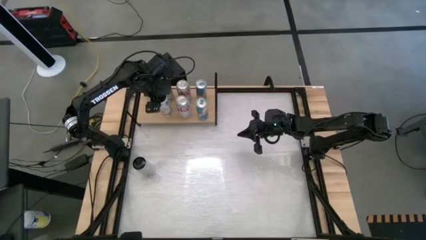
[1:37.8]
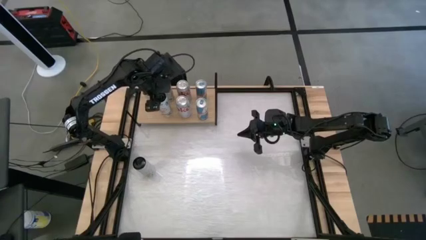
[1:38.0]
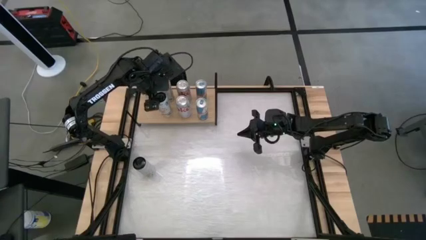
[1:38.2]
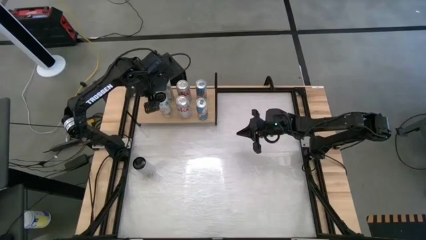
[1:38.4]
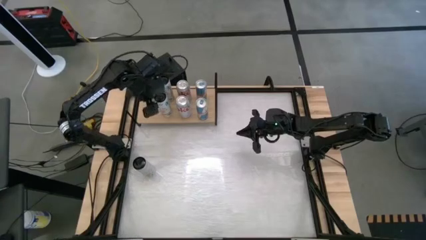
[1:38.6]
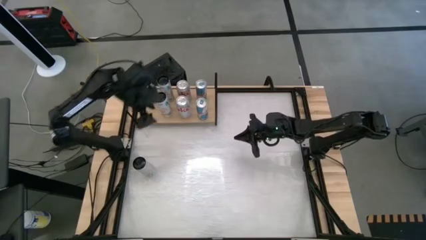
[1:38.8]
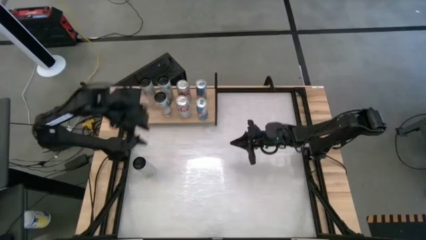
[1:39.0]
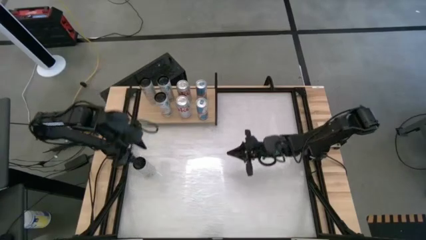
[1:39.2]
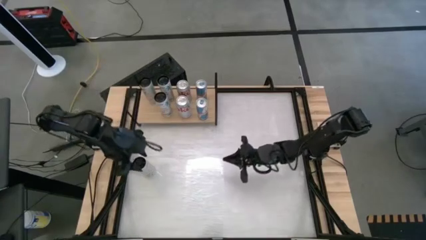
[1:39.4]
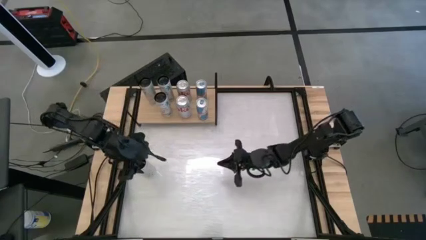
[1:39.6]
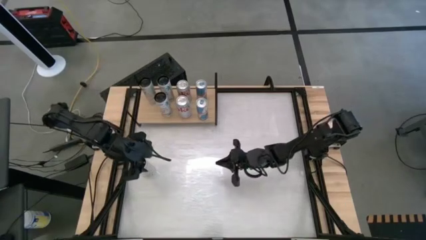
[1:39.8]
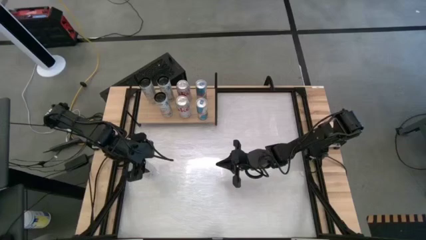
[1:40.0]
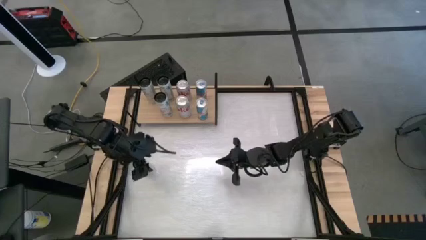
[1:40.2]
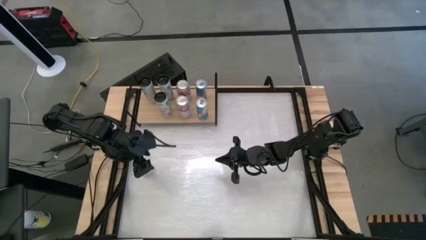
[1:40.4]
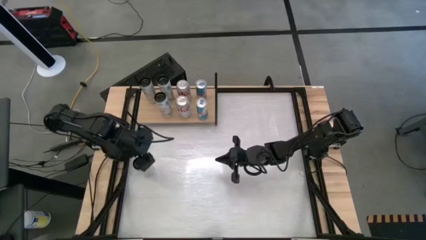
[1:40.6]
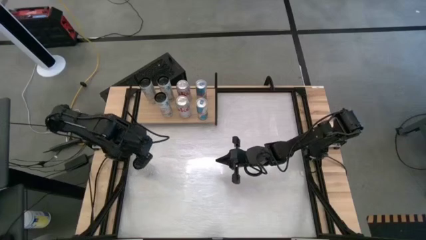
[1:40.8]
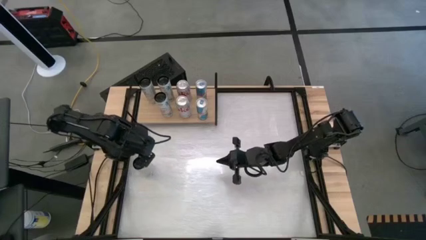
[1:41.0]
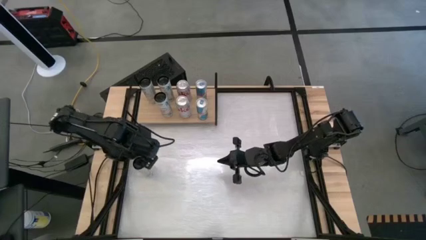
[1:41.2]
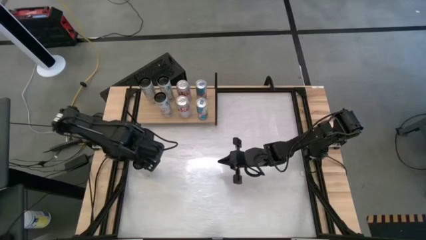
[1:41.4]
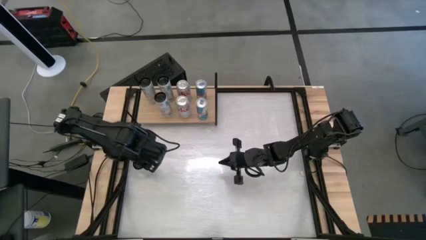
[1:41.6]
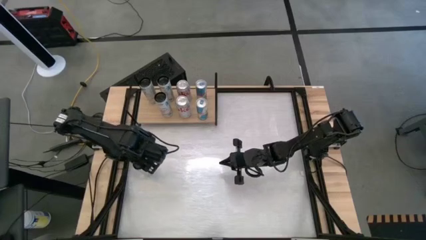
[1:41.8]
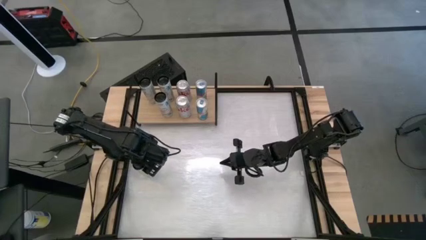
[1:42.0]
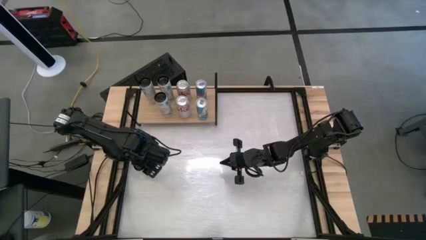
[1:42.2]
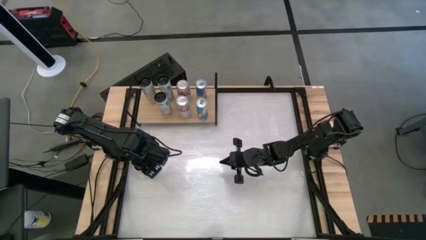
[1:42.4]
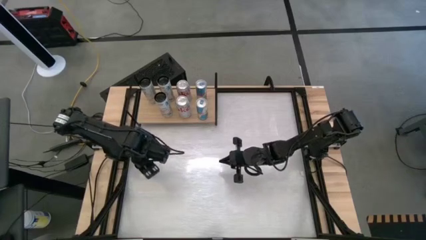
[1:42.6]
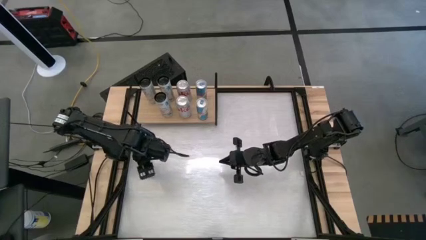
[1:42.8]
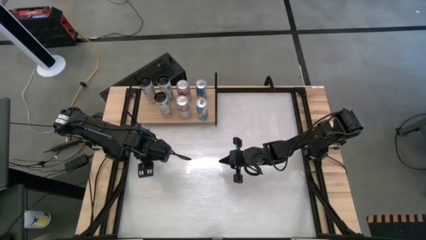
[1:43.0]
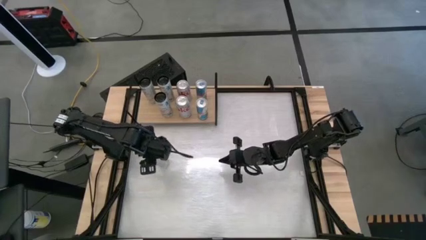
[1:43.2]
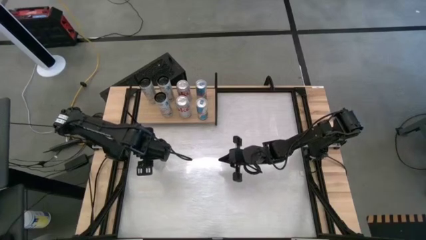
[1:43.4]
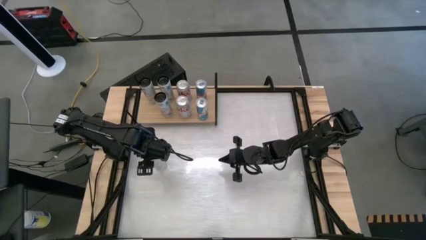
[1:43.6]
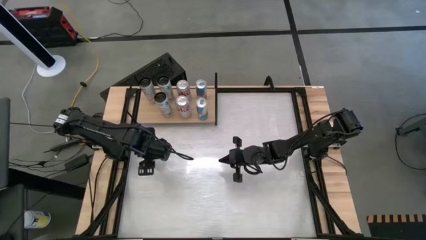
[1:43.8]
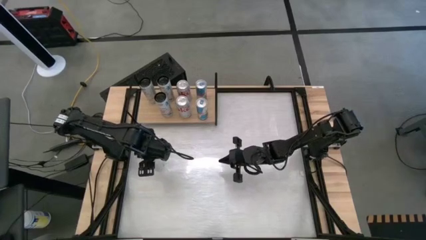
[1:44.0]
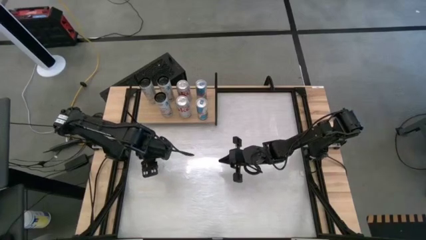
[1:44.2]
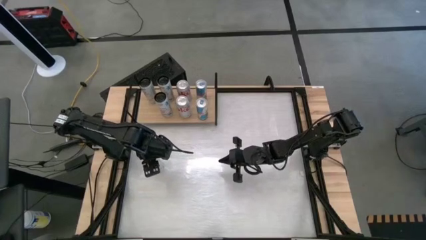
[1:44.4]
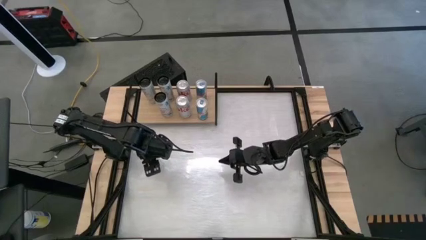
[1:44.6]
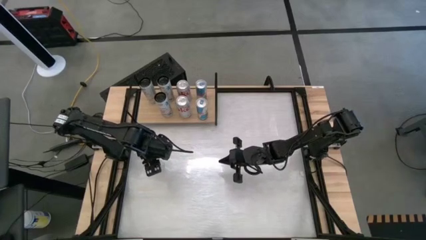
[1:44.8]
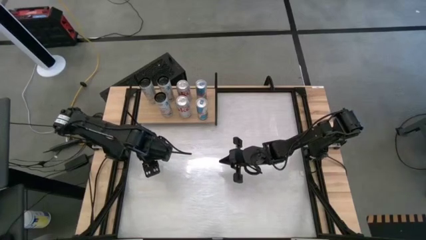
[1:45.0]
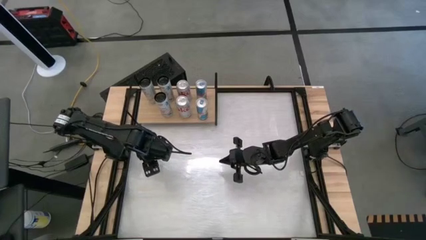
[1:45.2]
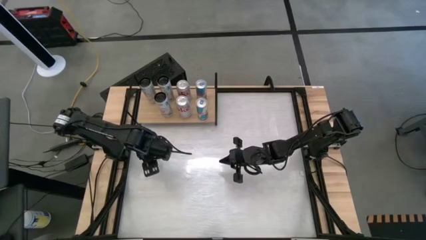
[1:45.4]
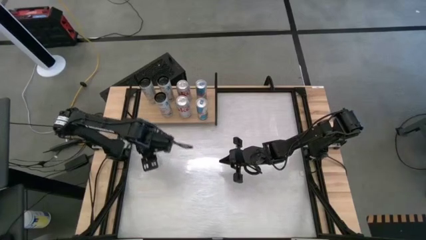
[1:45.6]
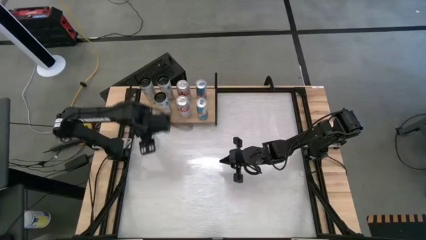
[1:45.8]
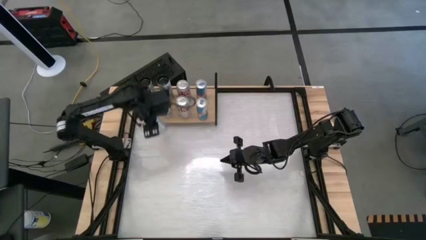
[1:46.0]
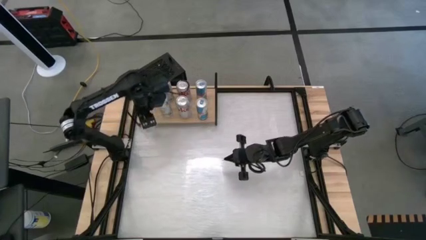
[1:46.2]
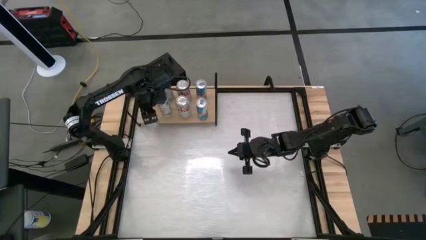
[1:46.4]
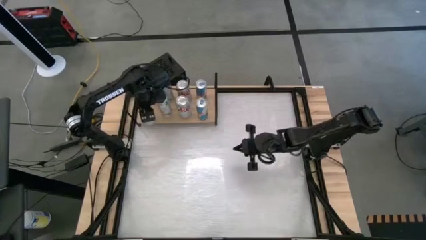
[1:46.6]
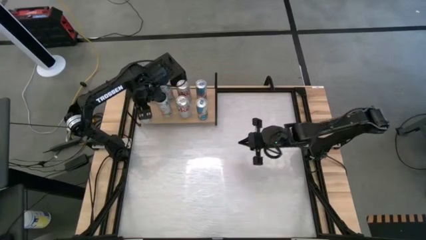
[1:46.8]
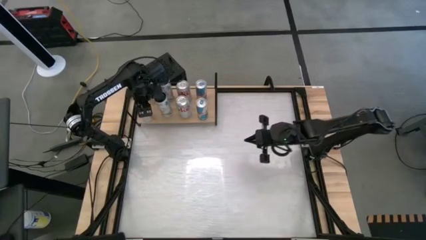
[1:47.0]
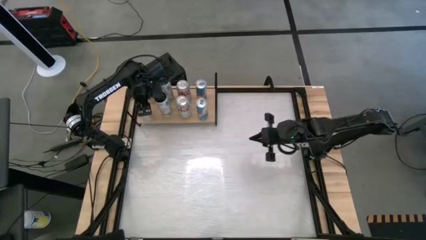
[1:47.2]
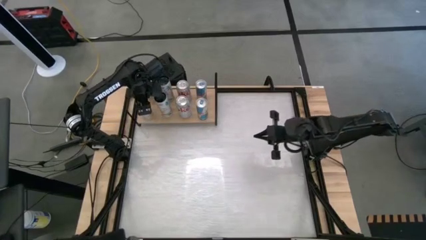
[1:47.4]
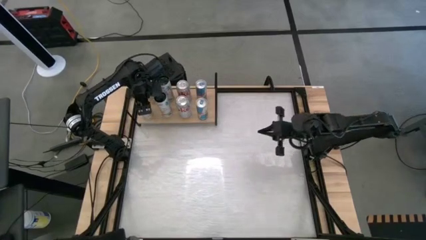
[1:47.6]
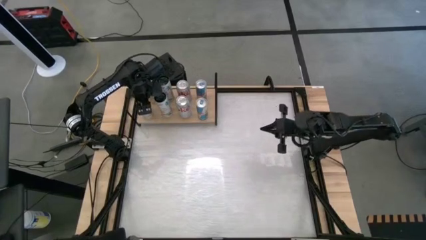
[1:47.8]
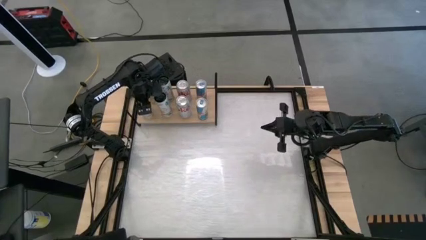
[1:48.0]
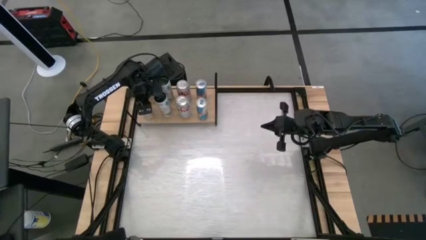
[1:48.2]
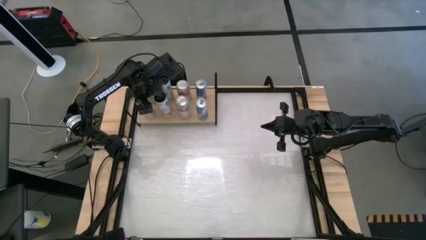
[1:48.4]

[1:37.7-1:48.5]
Task: Place canned beverage on shelf
Put the white soda can on the shelf

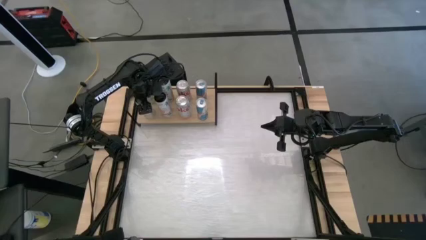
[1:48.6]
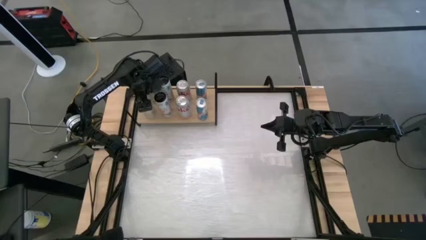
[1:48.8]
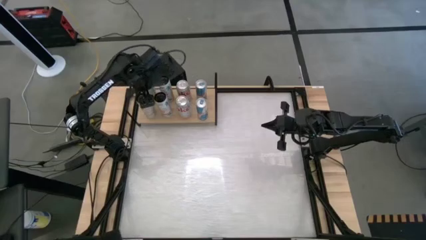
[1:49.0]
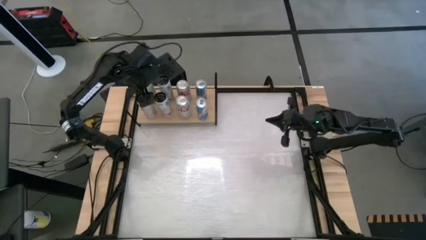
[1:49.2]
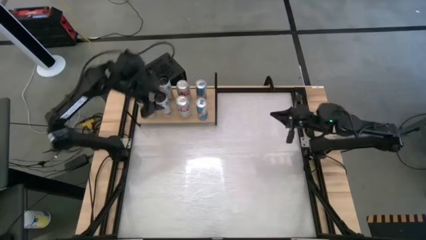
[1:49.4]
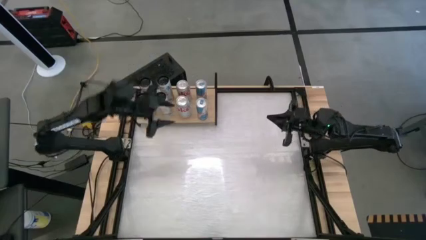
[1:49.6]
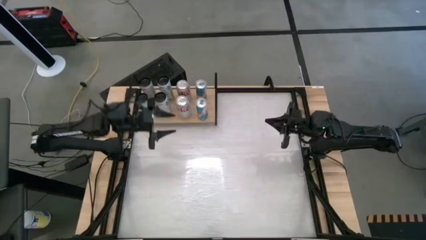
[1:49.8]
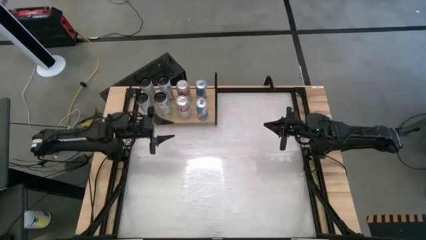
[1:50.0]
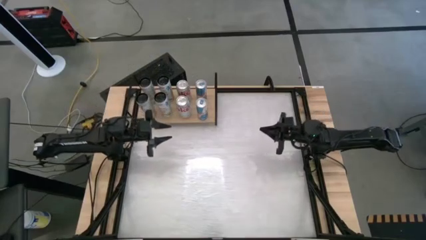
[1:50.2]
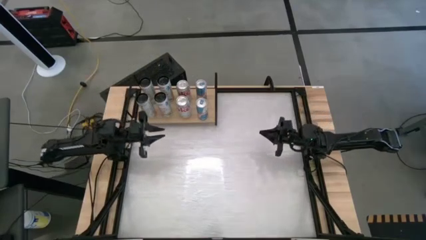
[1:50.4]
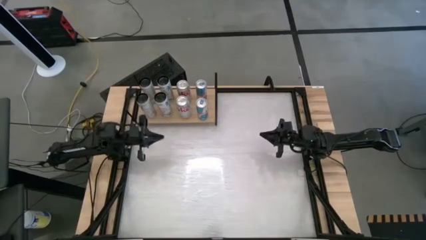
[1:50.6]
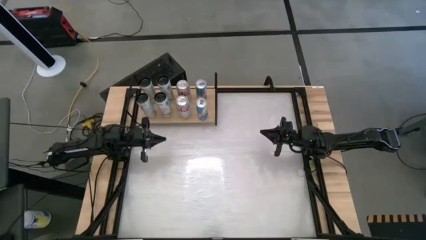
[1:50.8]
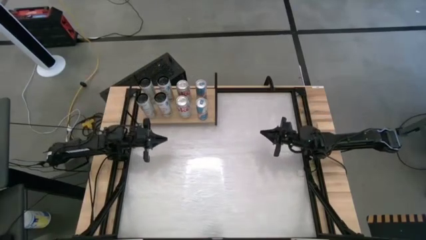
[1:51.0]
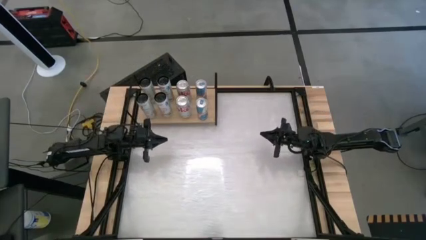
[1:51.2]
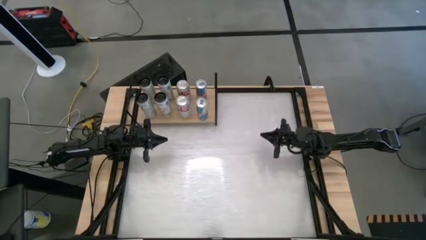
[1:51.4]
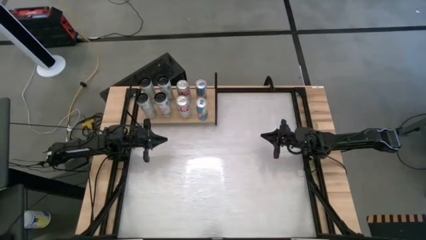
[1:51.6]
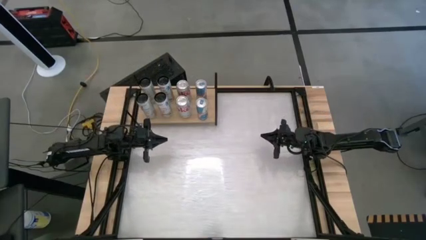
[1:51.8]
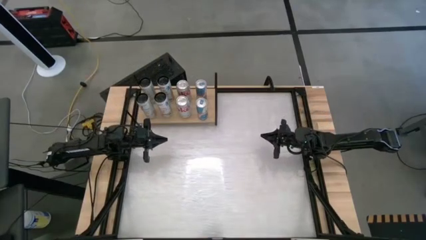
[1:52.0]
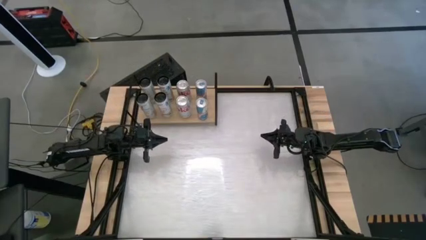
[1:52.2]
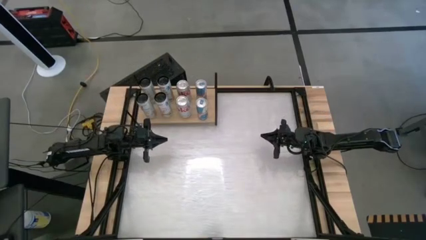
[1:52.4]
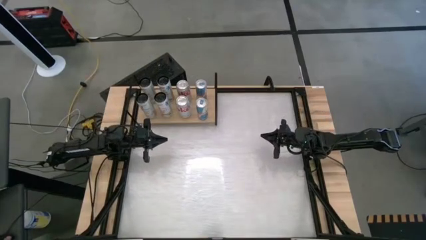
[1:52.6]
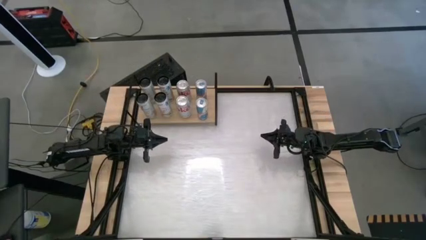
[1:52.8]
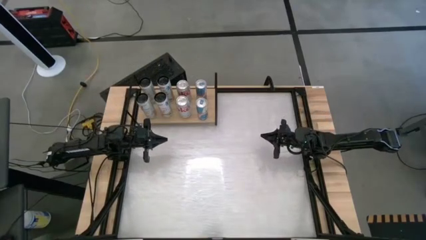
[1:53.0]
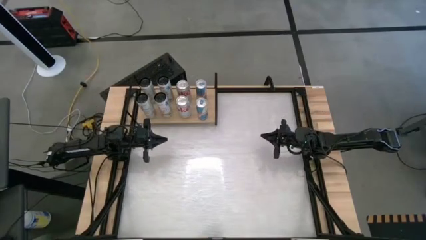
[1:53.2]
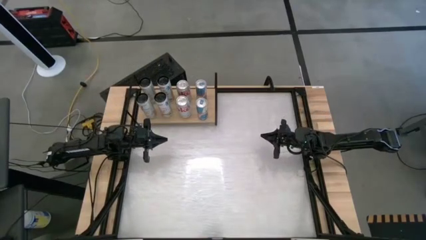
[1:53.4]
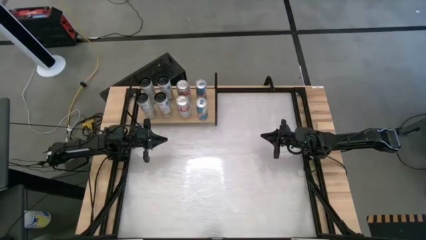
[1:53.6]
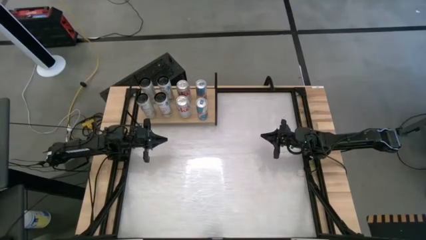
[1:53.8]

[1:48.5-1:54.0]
Return to Home Position
